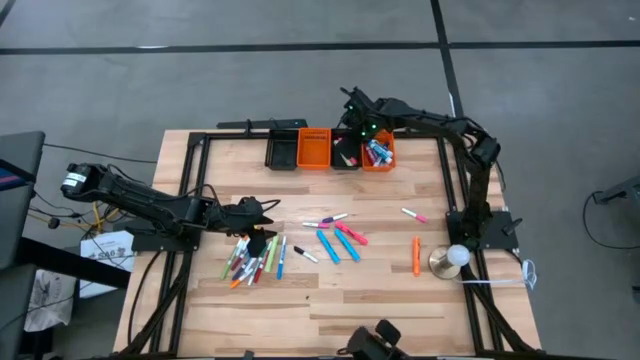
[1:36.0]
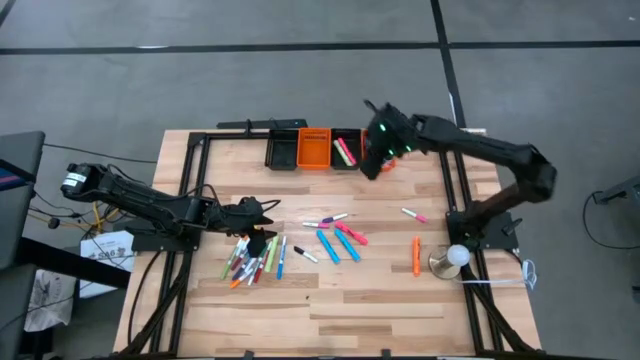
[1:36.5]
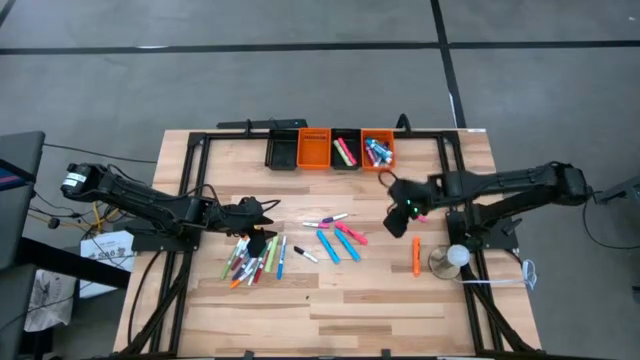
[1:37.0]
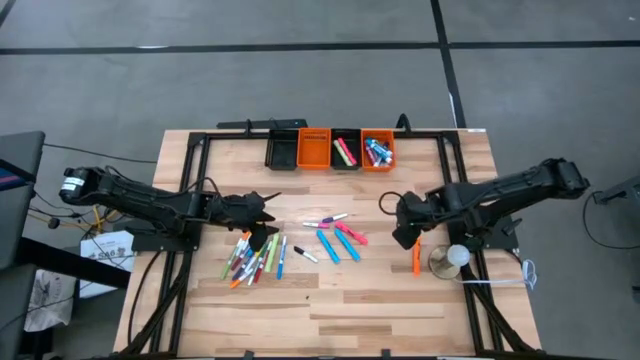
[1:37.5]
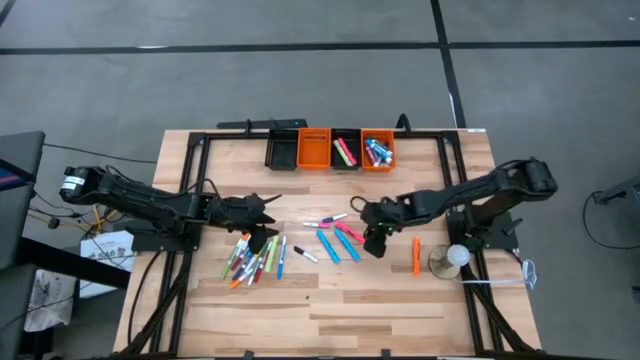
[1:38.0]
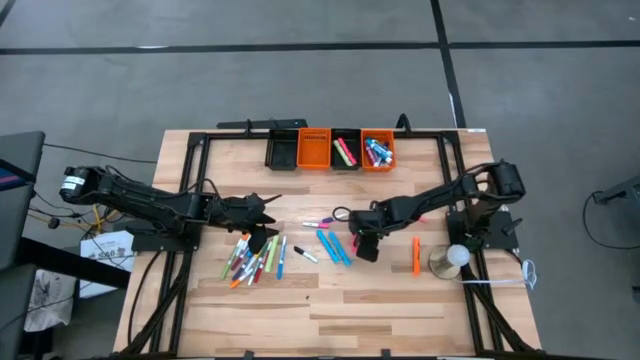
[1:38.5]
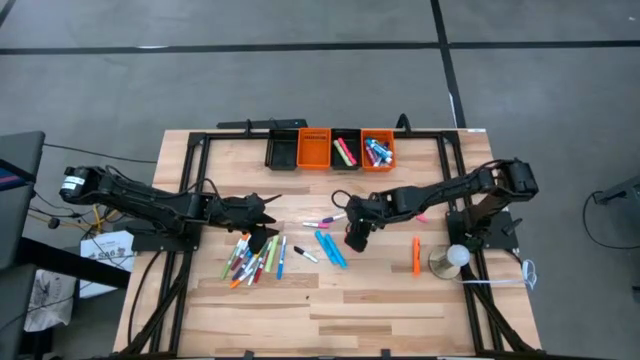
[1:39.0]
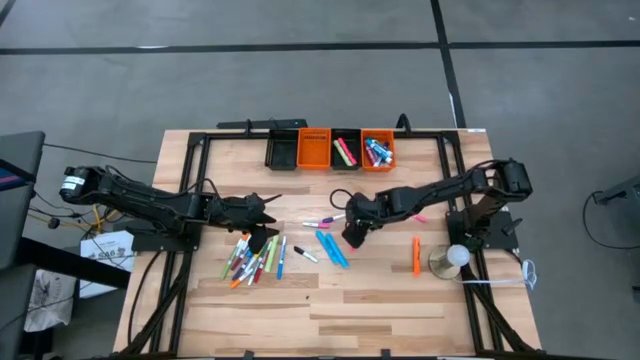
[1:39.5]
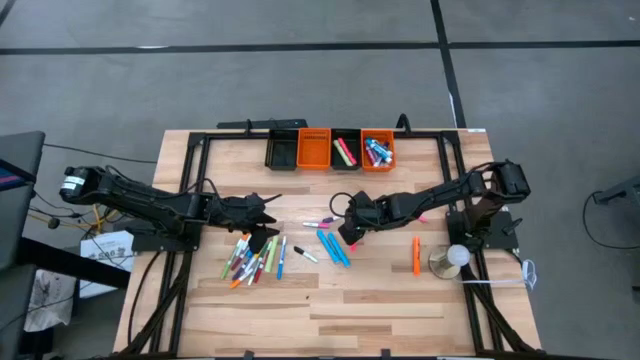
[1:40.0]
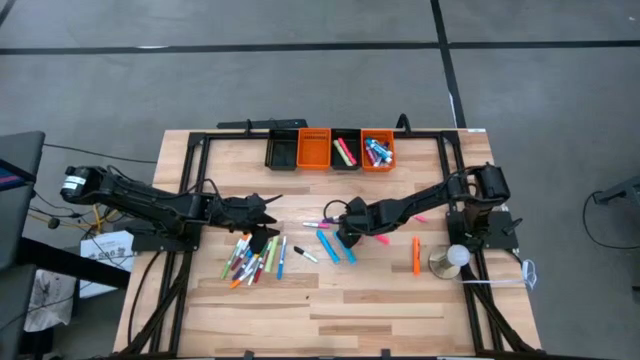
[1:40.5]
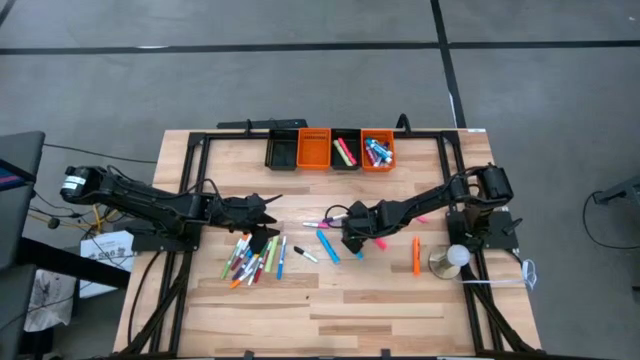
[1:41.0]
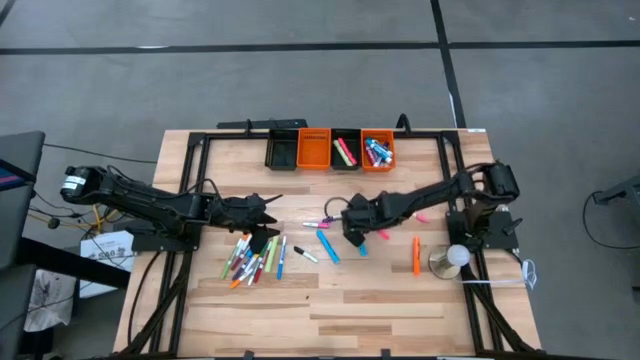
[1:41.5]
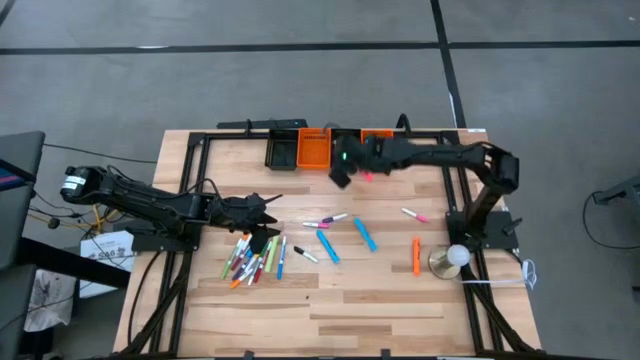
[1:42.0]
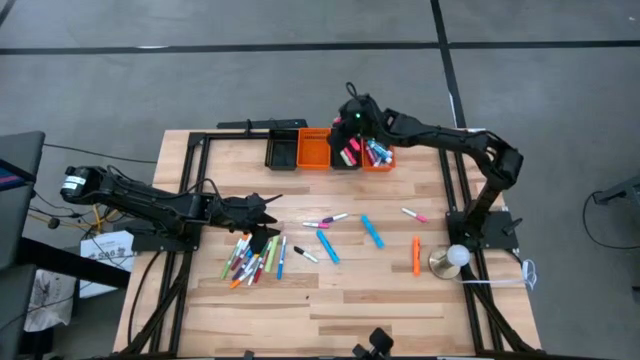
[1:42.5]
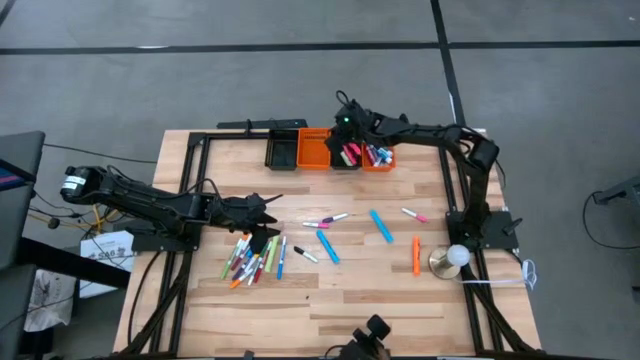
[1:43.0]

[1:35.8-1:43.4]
Task: Pick & Place Markers
Put the pink highlighter pen into the right black bin

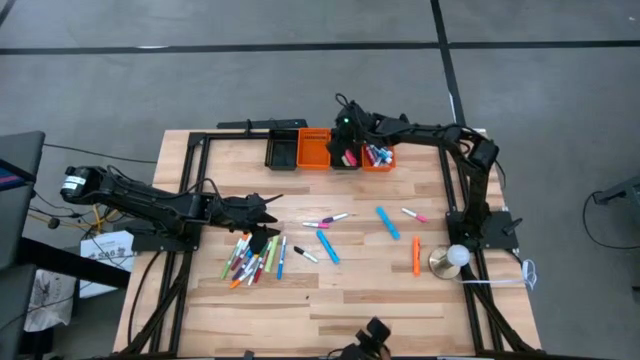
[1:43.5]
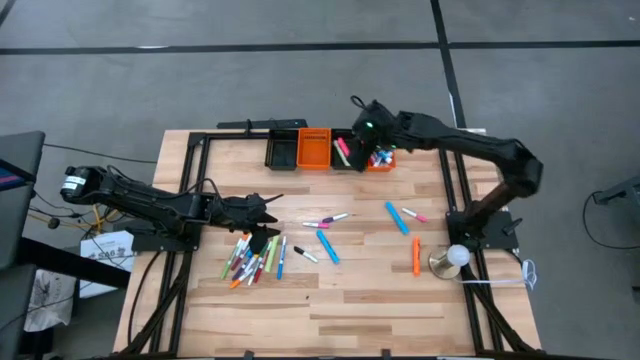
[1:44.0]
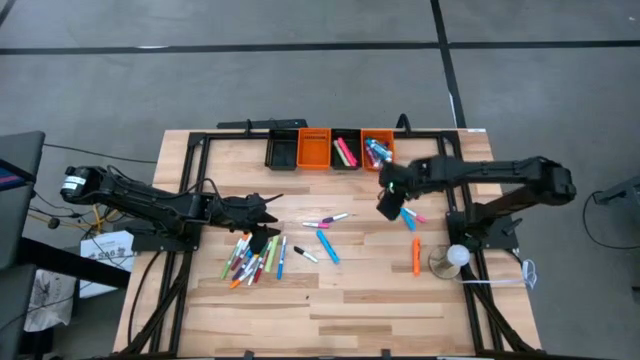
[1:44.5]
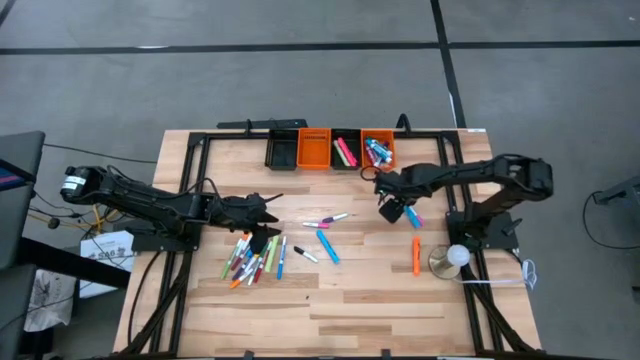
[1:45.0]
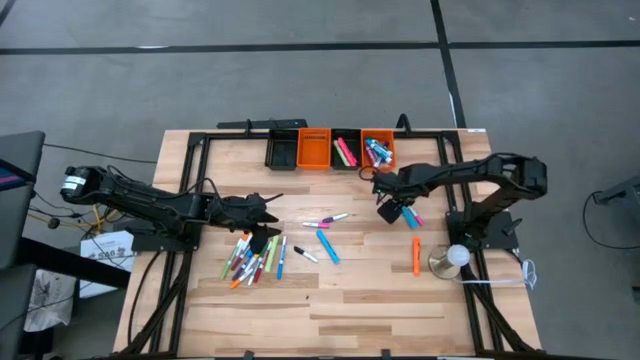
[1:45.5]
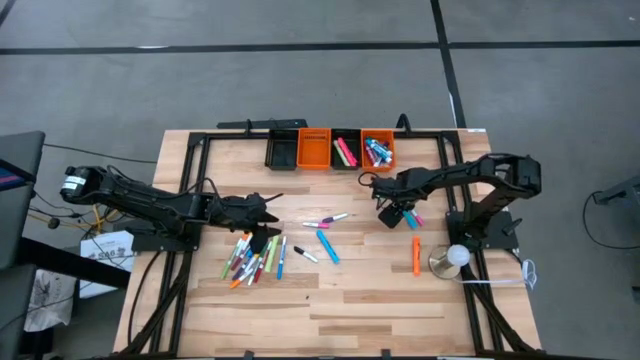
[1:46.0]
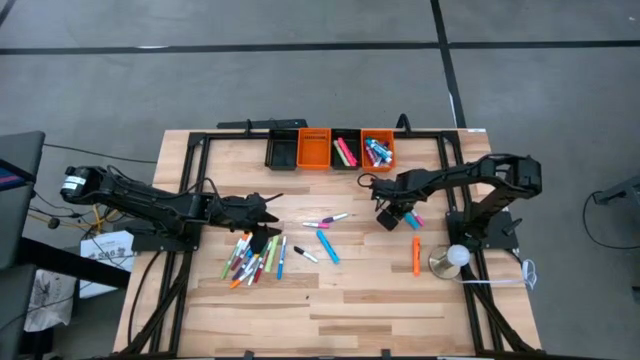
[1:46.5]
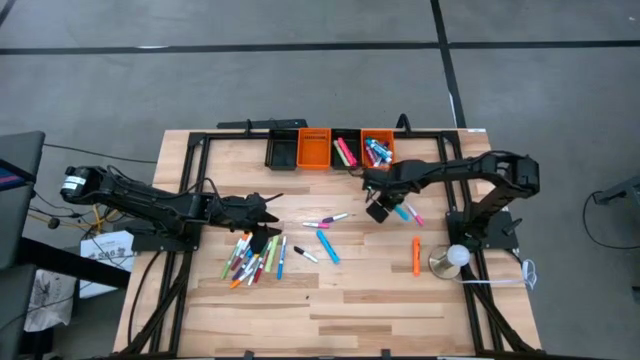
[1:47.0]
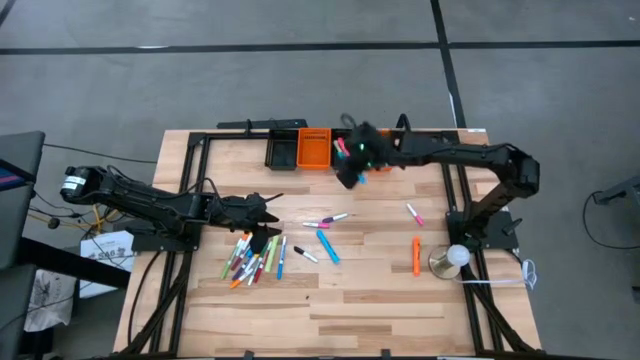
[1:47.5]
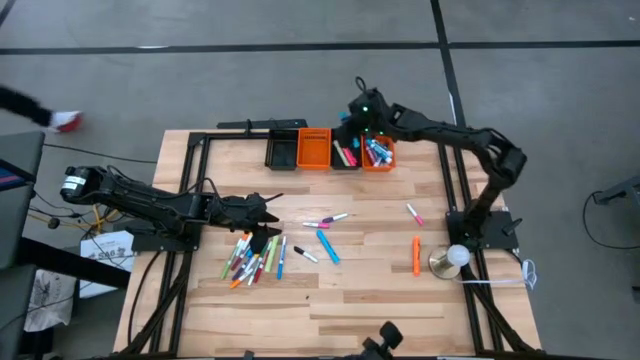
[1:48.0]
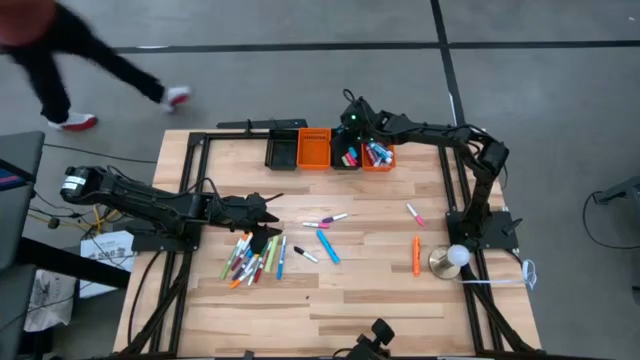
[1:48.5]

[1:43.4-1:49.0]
Put the light blue highlighter pen into the right black bin

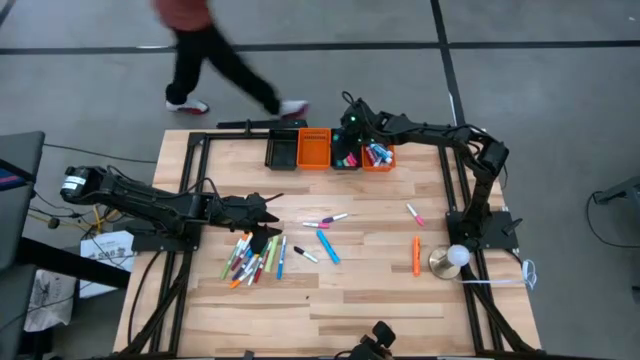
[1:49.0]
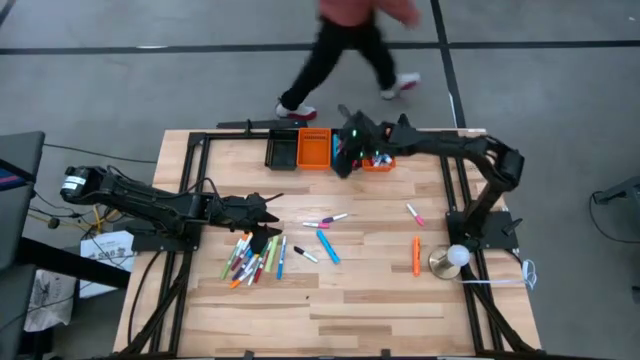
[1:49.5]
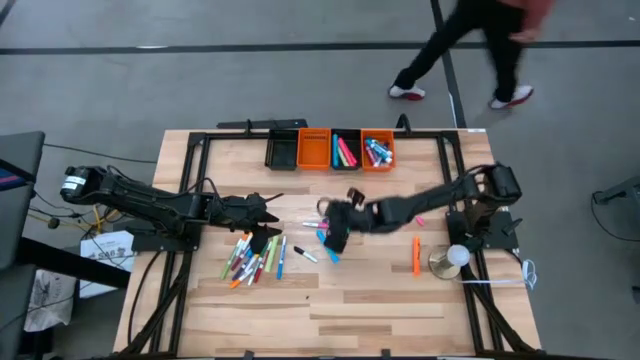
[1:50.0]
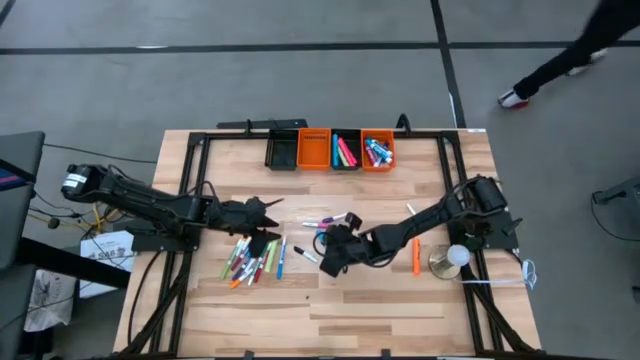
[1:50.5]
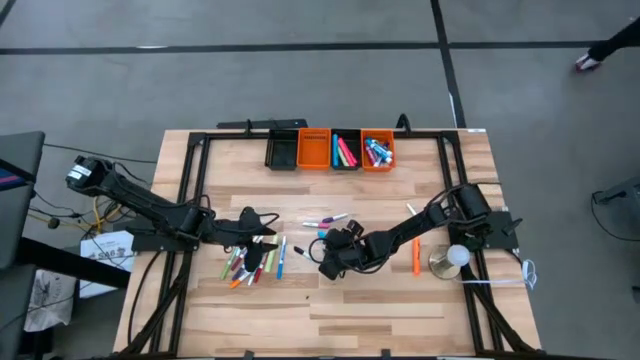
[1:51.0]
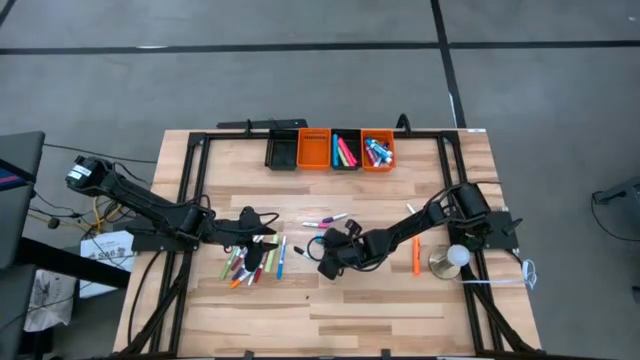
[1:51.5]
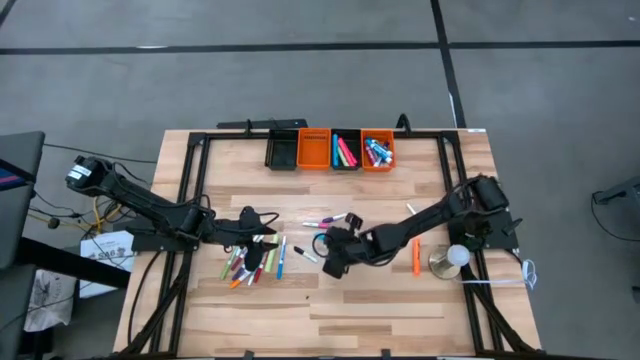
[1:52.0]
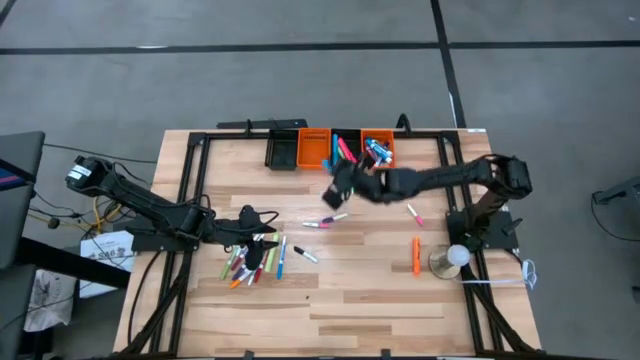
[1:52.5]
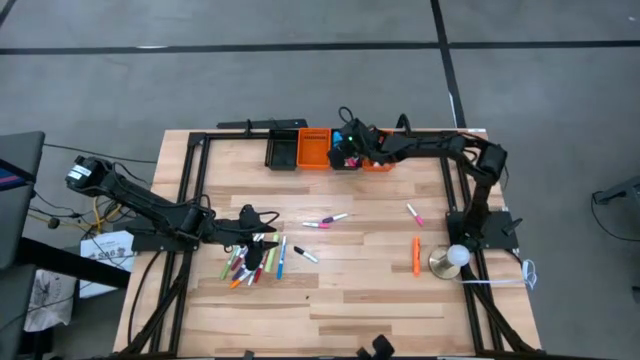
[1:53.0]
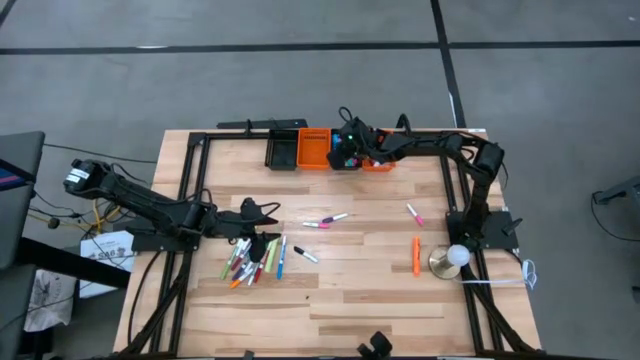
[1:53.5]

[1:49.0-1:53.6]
Put the light blue highlighter pen into the right black bin

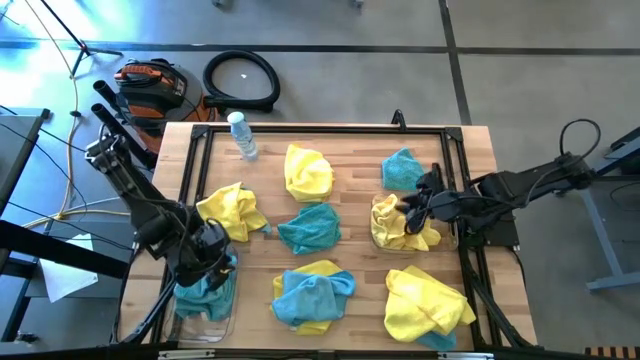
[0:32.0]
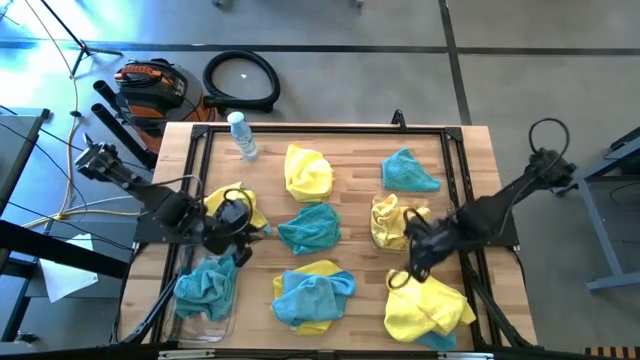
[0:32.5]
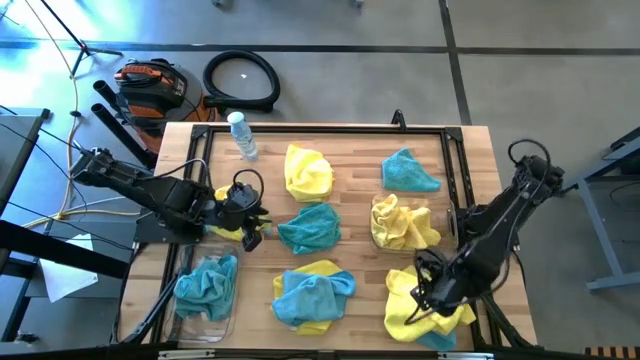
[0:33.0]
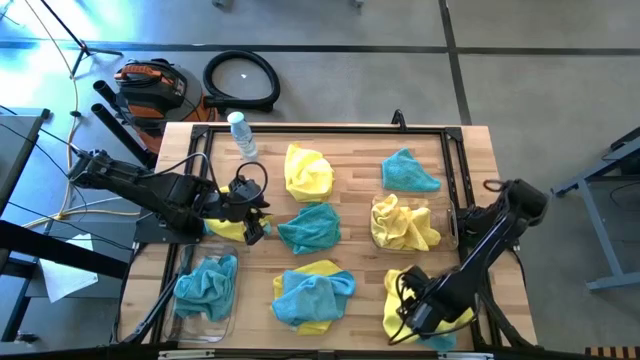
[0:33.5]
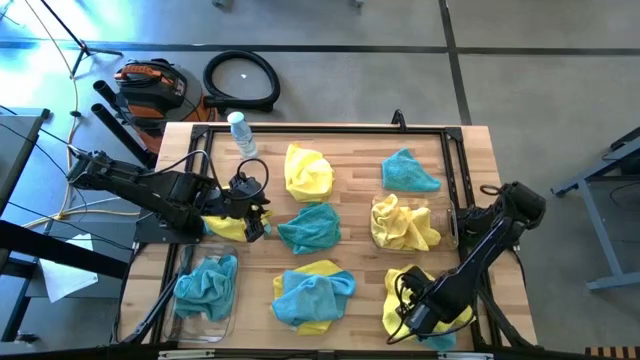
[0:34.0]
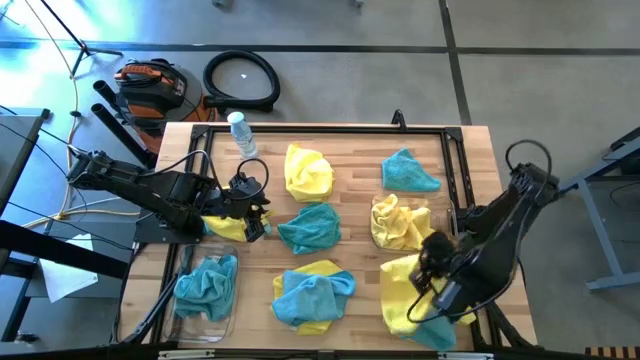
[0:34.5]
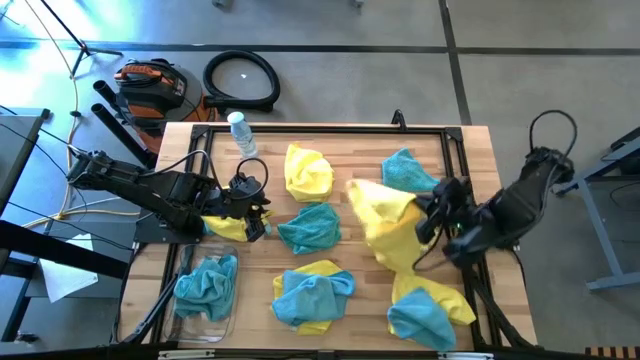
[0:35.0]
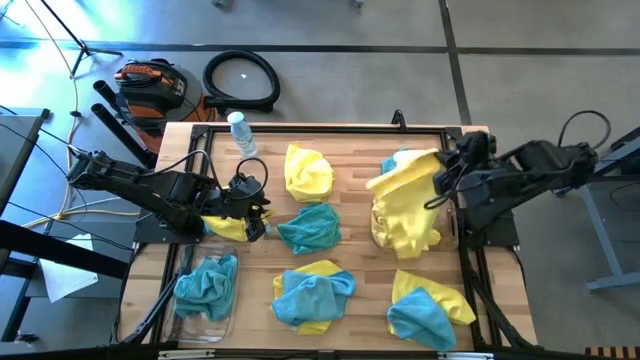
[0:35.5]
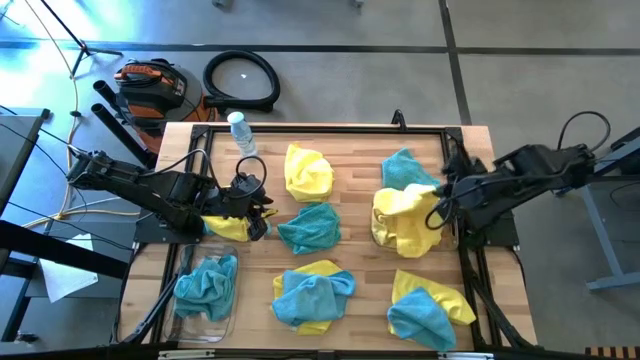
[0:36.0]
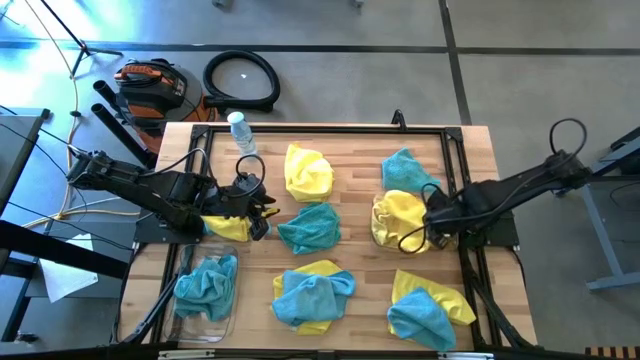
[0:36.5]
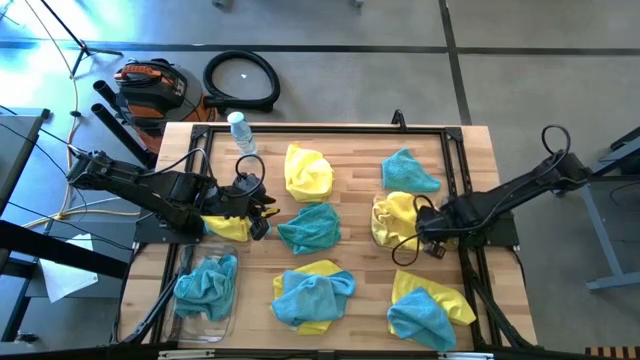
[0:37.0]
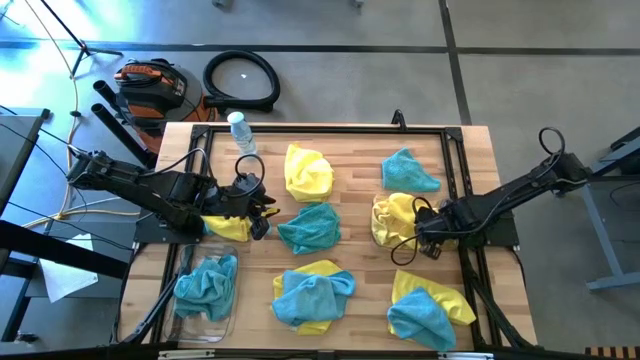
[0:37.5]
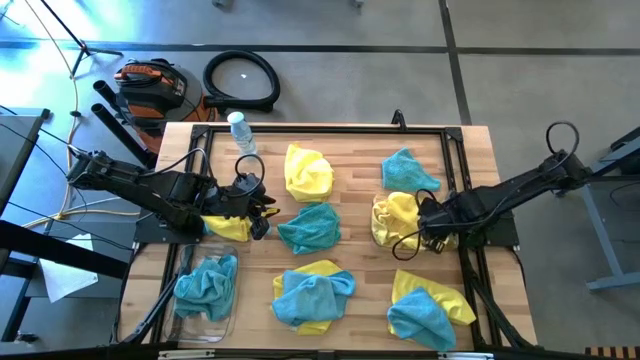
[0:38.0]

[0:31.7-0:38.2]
Task: Sort microfiber towel by color & place in baskets
Put the yellow microfiber towel into the right transparent bin
